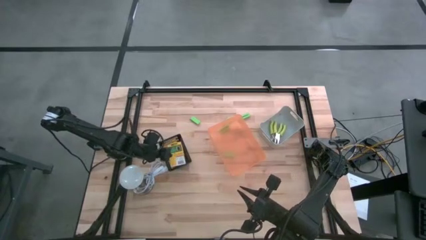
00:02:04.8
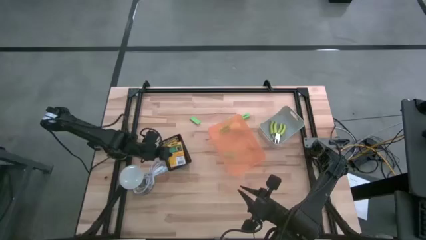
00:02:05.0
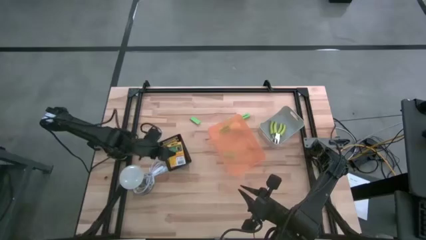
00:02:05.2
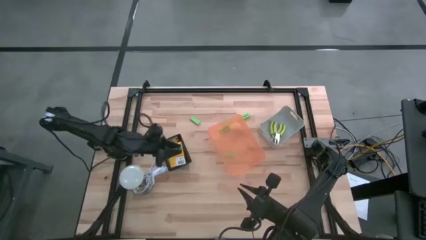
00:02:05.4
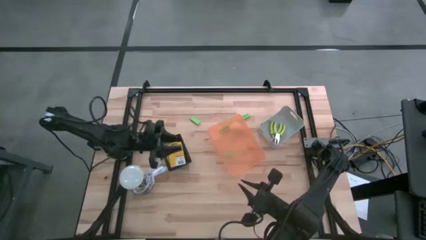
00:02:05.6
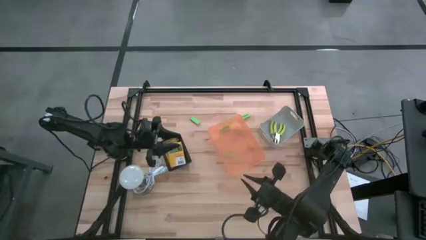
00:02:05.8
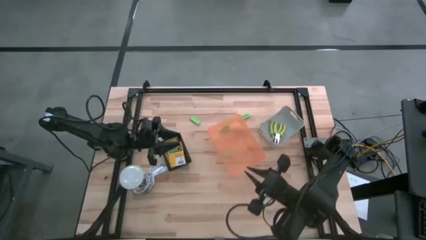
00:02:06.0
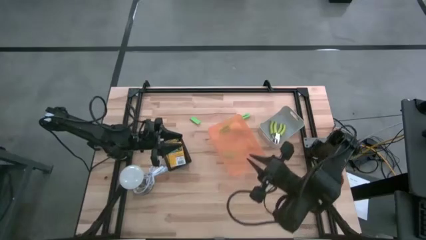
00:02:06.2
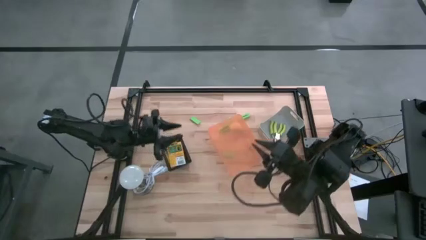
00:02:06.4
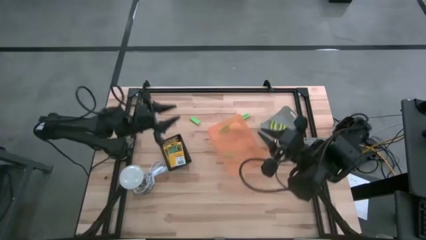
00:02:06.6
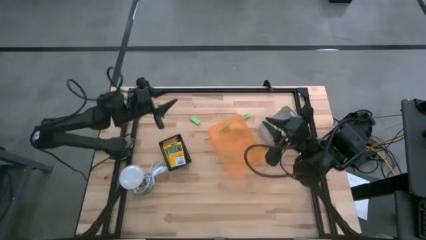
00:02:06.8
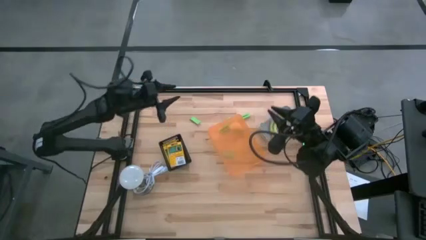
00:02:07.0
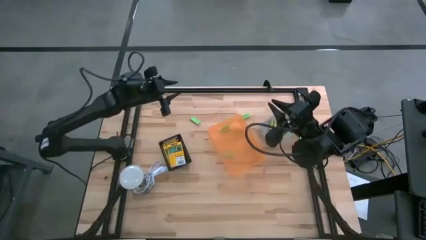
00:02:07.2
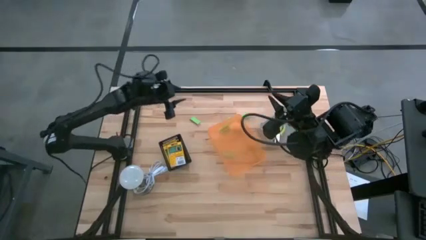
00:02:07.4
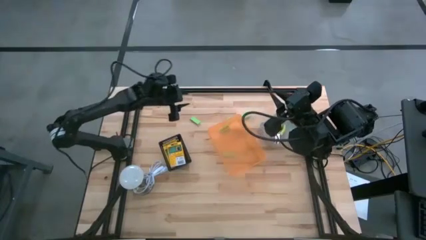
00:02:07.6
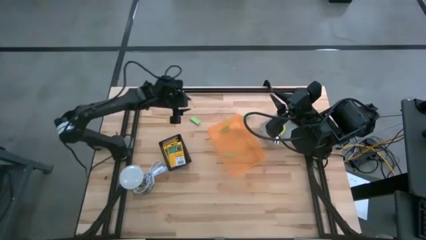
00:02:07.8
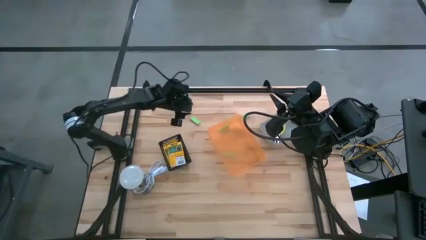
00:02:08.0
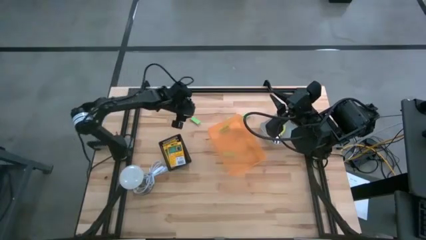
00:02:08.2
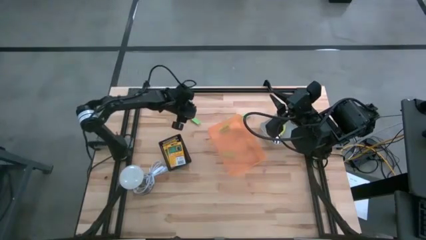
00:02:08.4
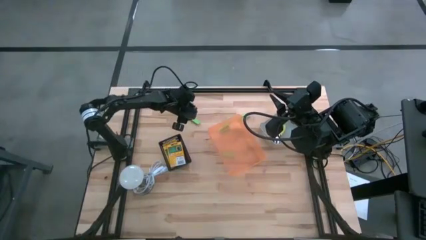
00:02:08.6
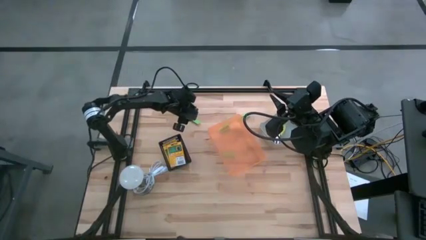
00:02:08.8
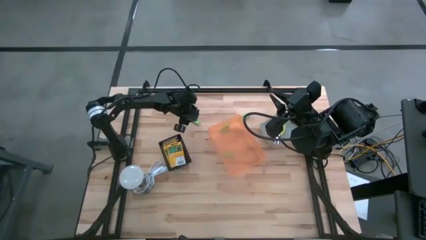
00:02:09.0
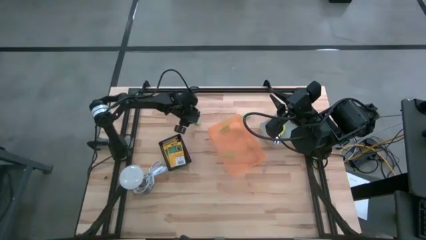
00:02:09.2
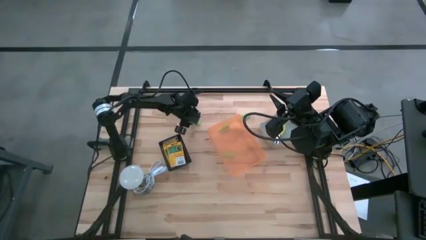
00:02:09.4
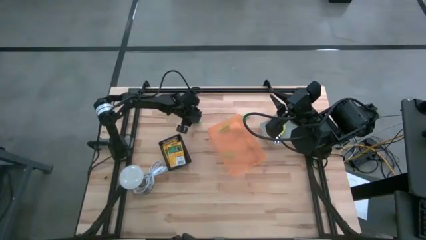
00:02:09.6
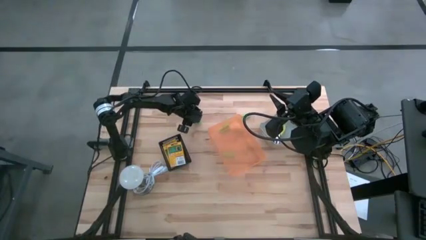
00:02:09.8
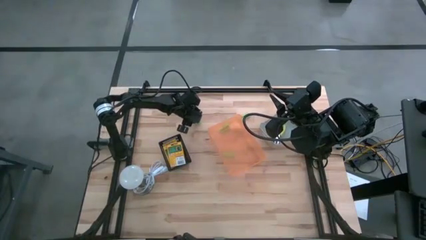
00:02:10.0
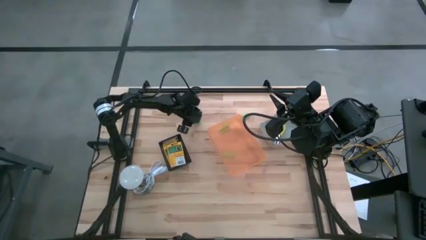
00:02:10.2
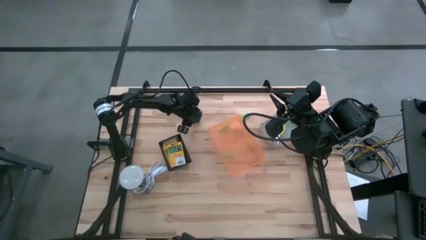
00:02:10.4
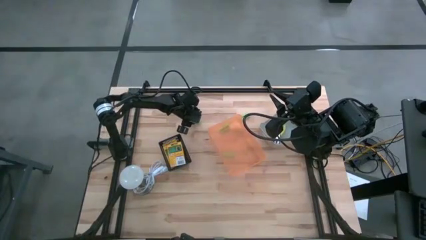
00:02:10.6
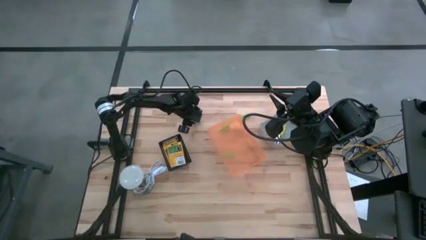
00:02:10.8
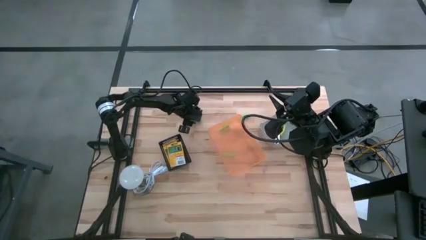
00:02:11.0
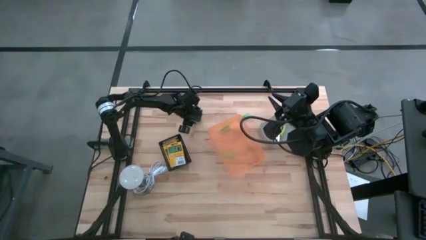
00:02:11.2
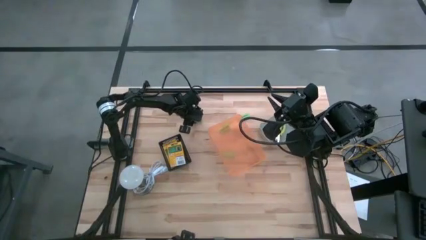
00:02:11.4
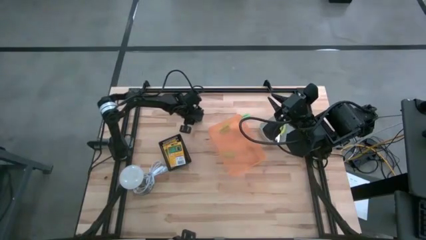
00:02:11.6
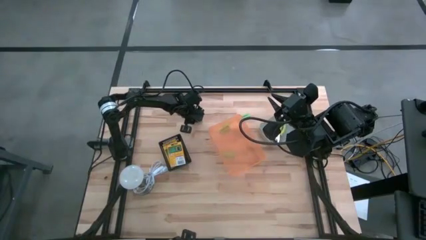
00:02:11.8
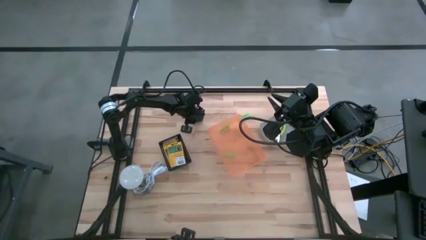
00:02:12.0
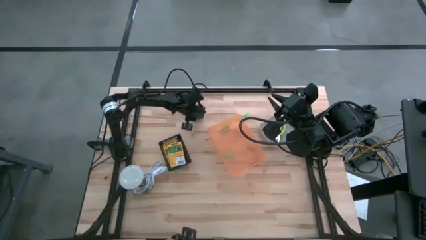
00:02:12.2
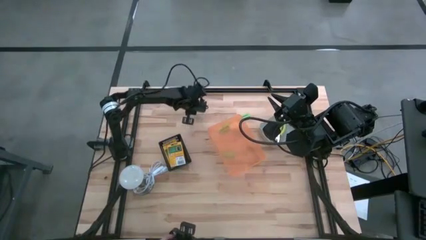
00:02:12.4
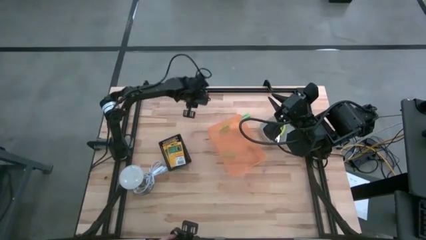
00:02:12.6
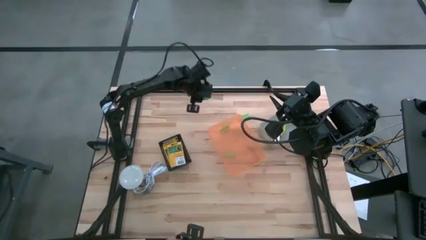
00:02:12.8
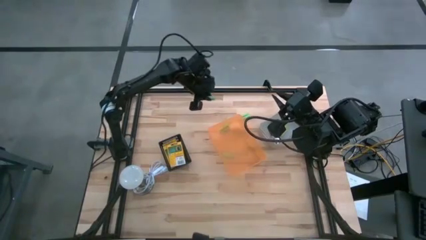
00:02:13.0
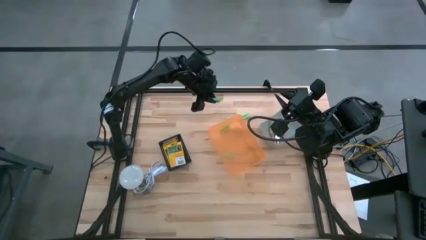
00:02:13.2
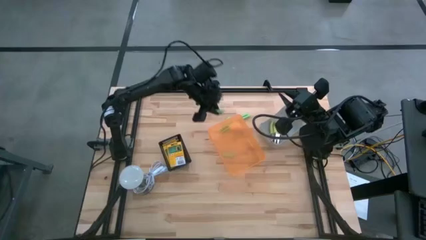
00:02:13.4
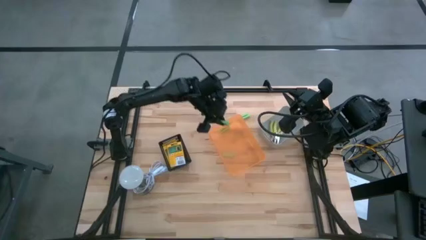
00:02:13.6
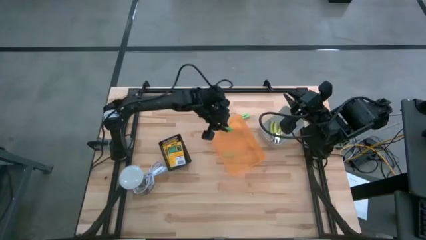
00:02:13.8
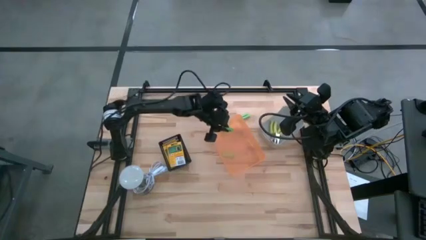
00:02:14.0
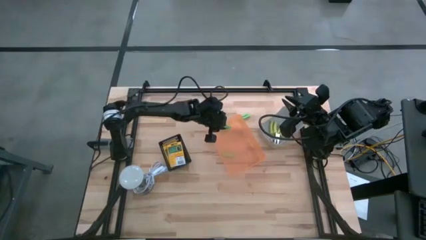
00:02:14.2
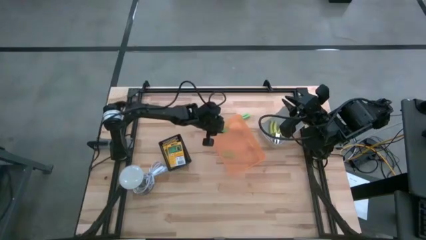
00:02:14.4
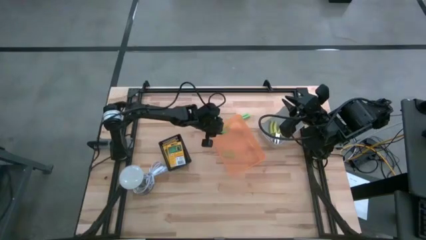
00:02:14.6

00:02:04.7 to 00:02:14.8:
Task: Pick & Place School Supplies
Put the green eraser into the orange bin

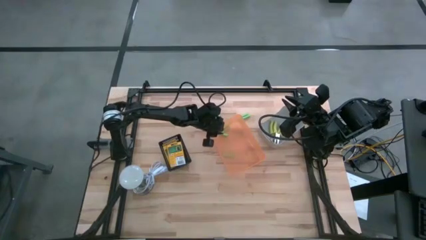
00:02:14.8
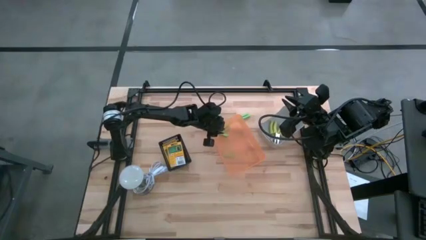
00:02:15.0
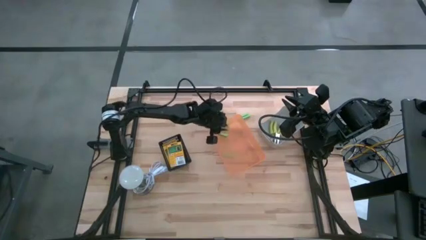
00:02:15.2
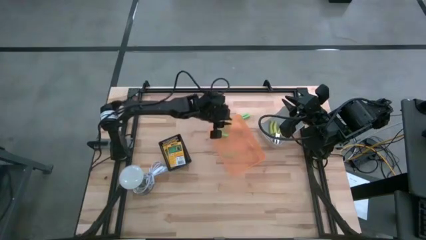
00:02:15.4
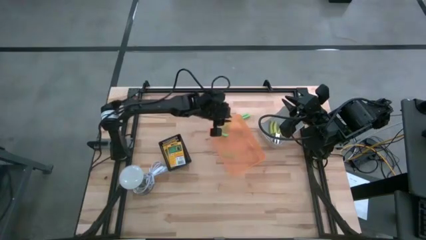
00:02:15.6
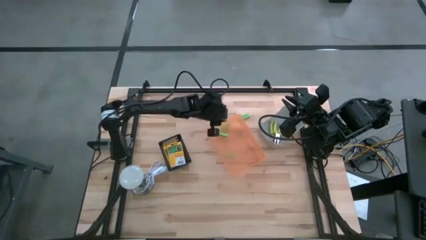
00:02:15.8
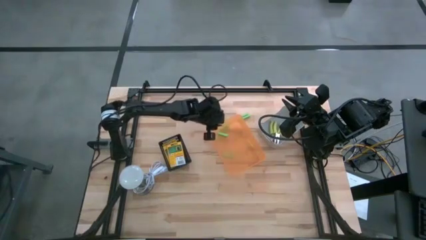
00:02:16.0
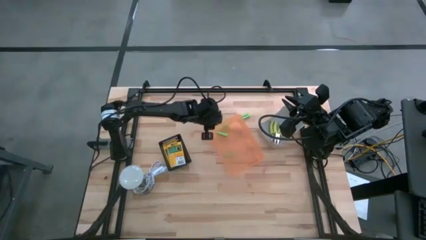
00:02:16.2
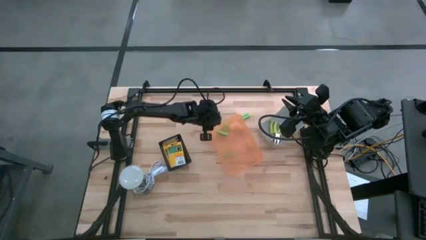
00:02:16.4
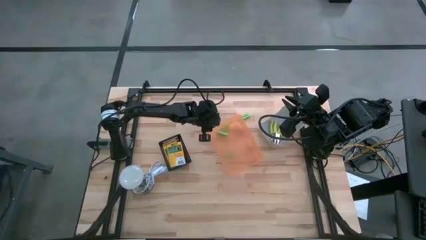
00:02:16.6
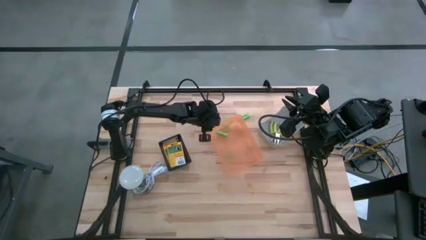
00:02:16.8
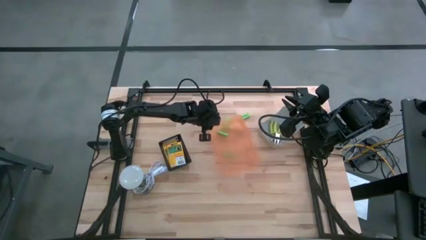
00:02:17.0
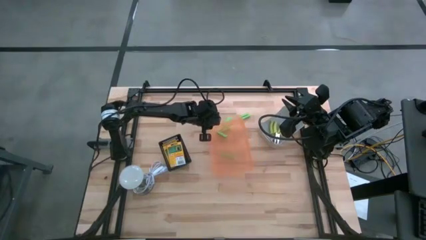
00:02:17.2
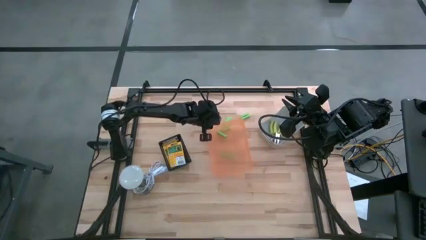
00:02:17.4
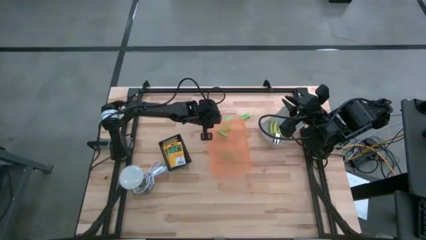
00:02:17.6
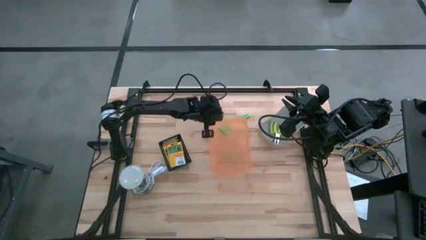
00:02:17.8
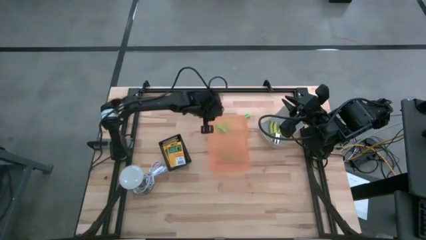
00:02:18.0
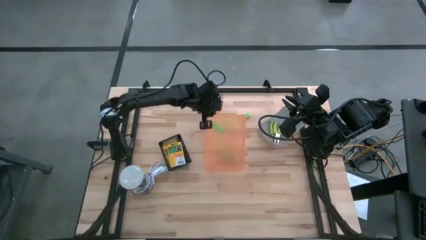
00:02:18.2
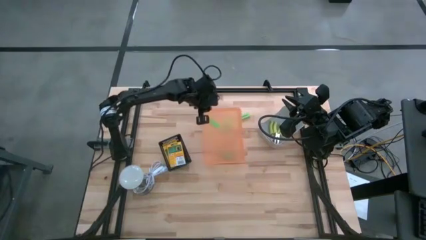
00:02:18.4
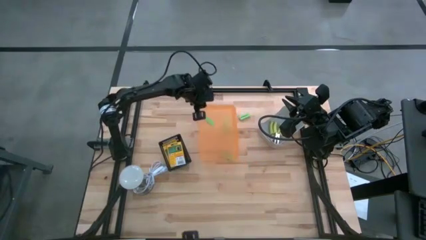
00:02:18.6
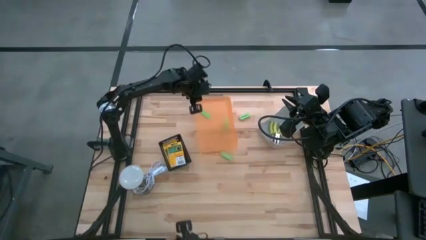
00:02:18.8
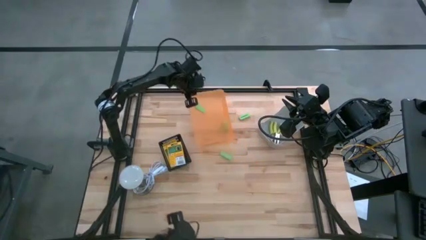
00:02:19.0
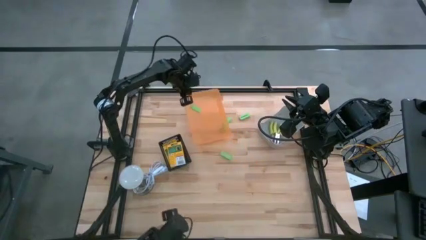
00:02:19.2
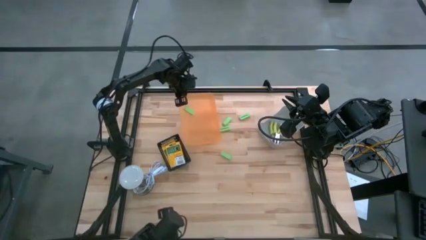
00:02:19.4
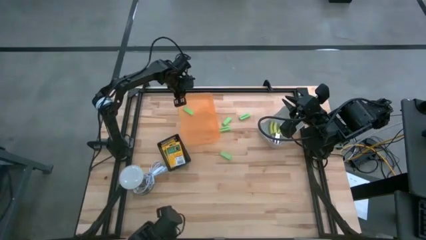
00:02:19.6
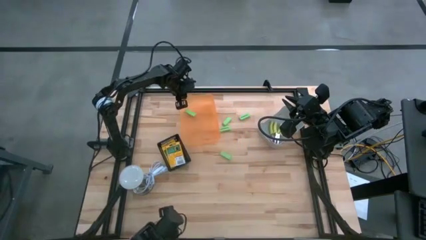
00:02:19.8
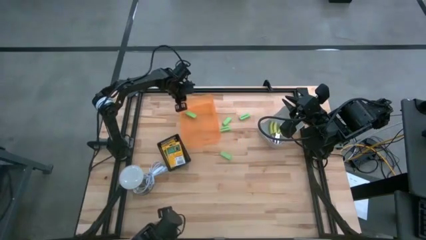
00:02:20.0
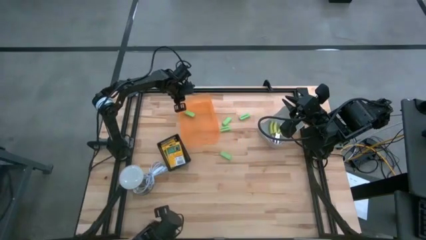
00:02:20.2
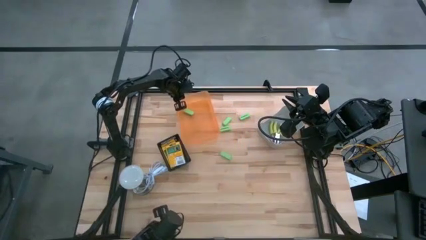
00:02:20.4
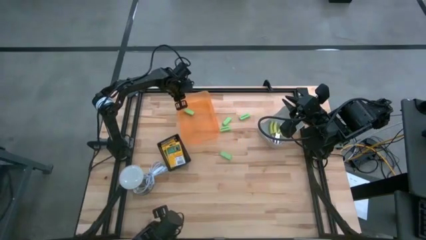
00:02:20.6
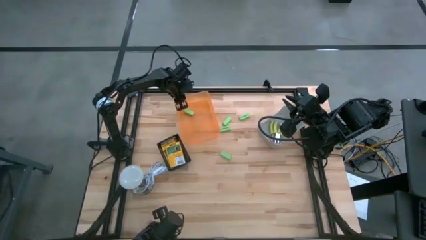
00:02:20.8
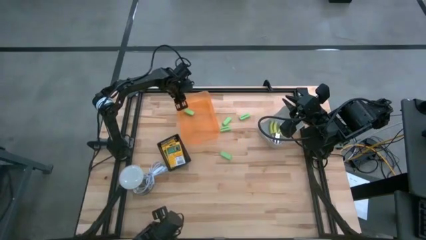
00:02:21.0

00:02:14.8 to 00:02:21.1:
Move the orange bin to the top left of the table
